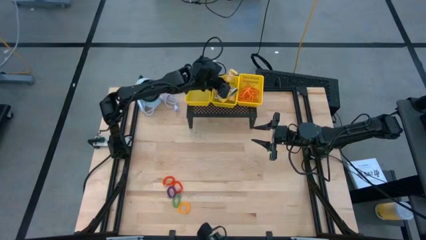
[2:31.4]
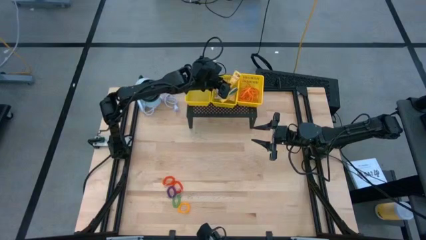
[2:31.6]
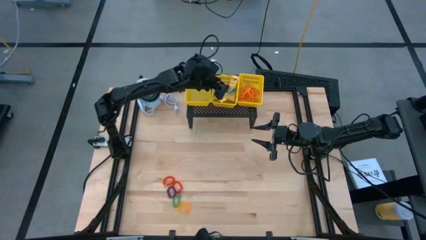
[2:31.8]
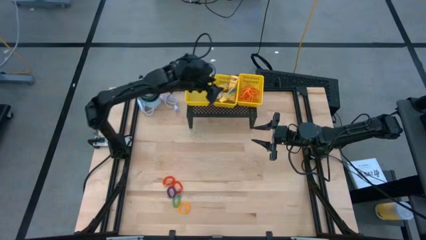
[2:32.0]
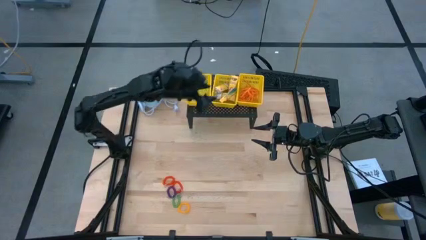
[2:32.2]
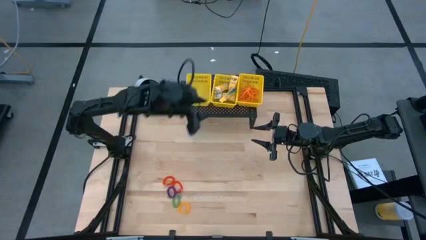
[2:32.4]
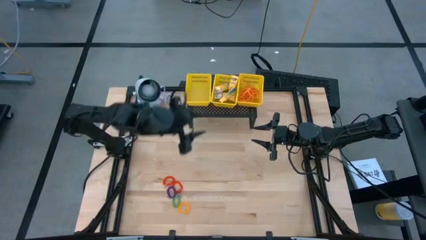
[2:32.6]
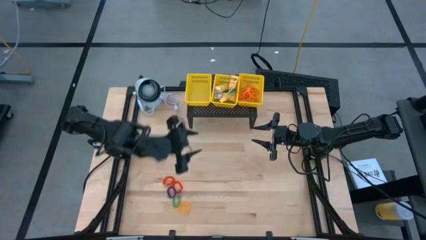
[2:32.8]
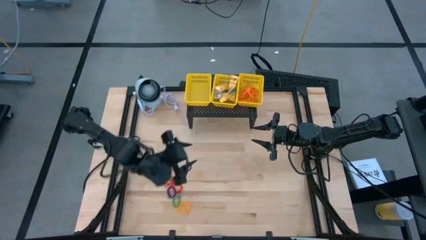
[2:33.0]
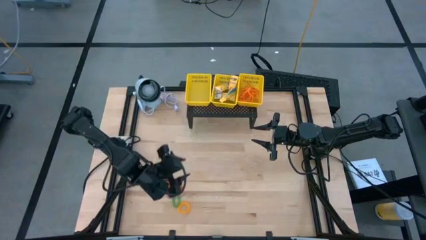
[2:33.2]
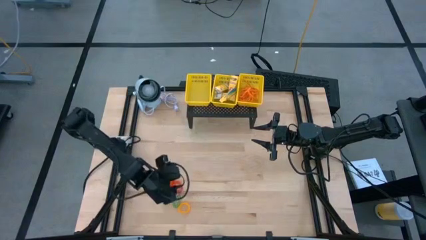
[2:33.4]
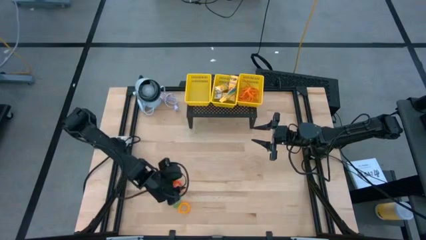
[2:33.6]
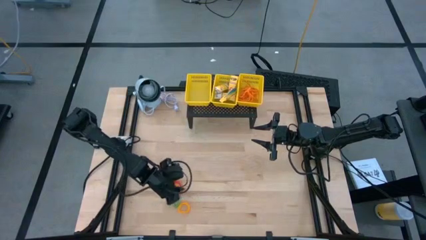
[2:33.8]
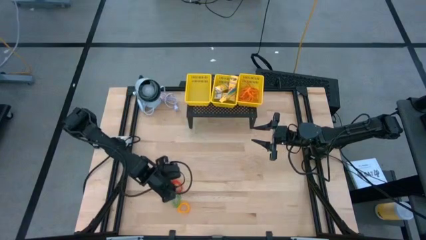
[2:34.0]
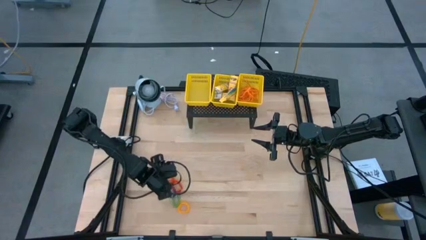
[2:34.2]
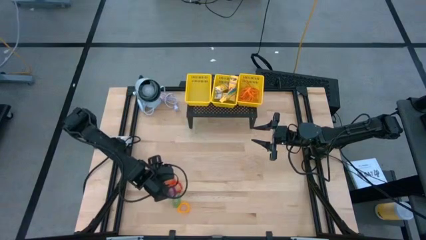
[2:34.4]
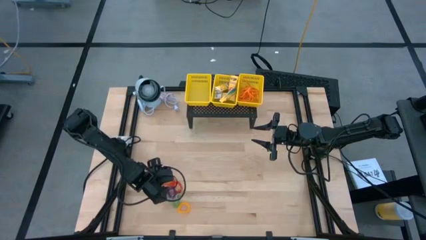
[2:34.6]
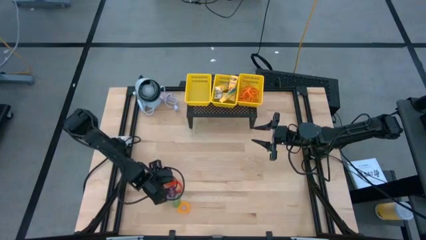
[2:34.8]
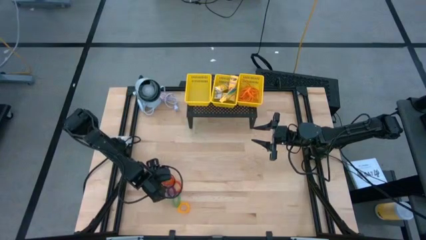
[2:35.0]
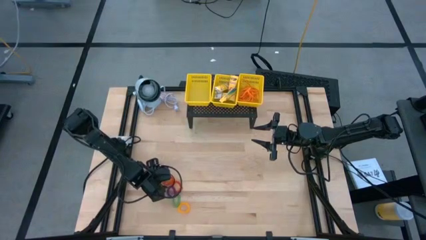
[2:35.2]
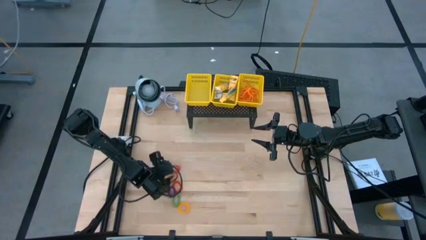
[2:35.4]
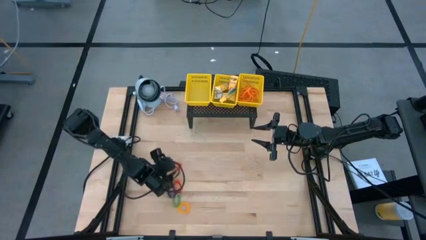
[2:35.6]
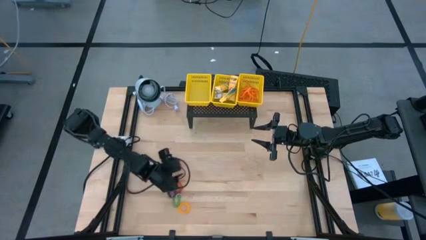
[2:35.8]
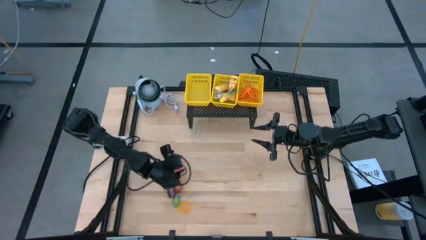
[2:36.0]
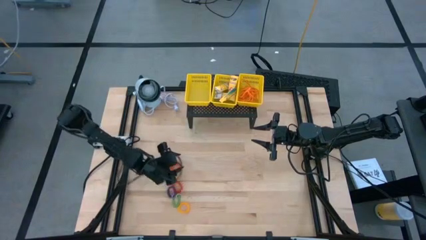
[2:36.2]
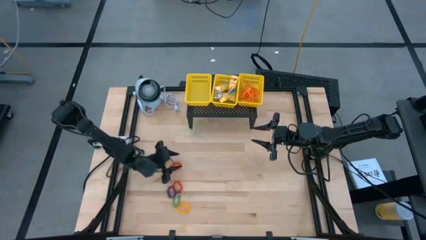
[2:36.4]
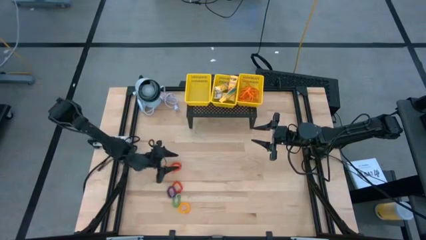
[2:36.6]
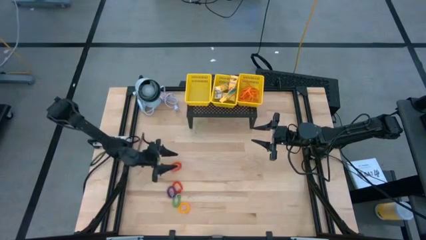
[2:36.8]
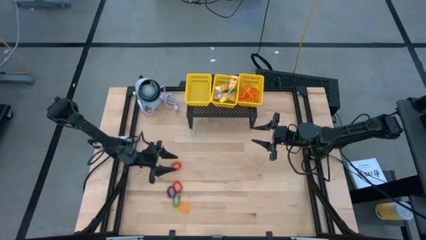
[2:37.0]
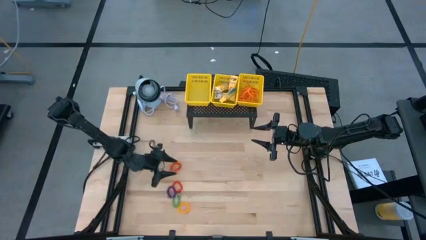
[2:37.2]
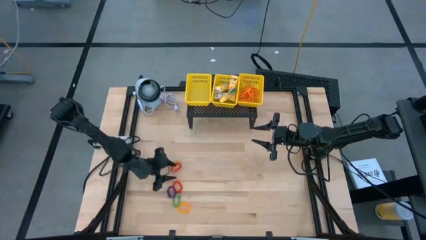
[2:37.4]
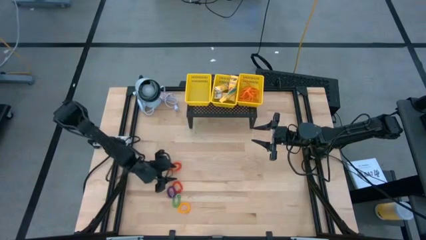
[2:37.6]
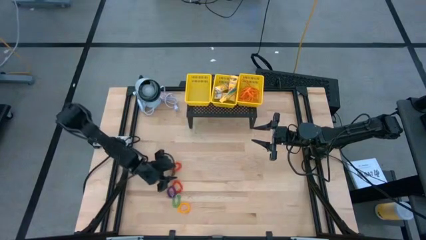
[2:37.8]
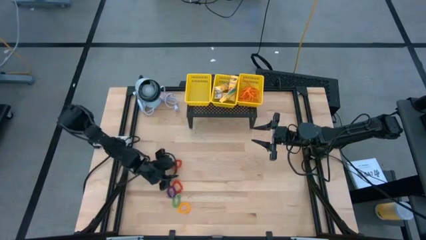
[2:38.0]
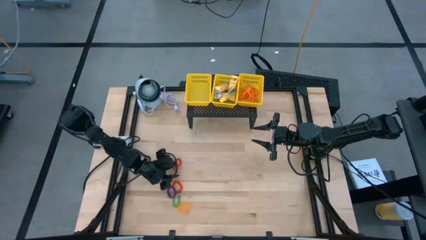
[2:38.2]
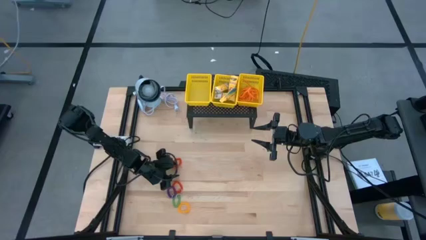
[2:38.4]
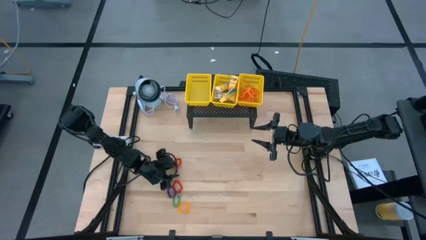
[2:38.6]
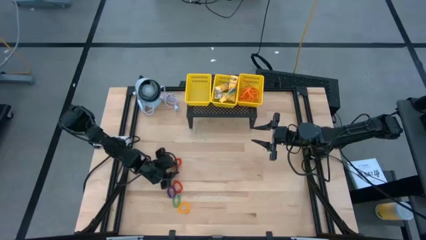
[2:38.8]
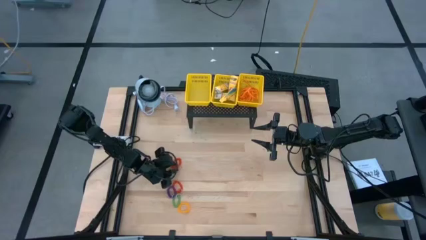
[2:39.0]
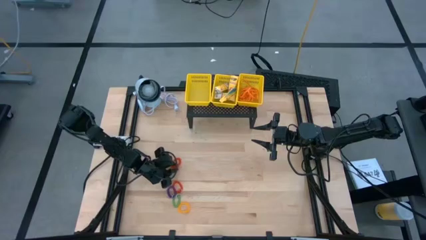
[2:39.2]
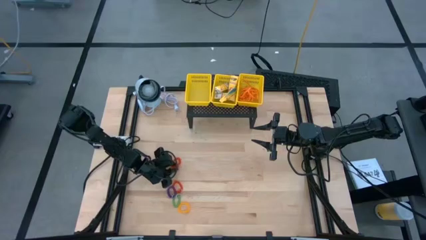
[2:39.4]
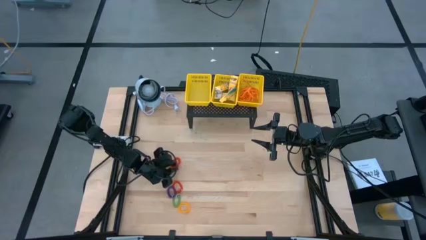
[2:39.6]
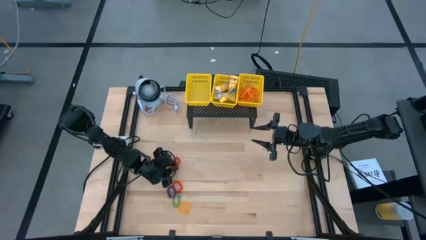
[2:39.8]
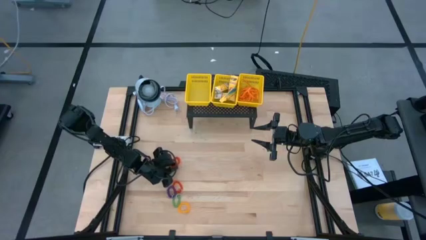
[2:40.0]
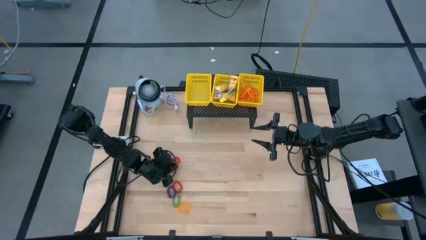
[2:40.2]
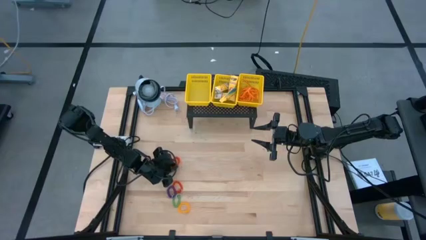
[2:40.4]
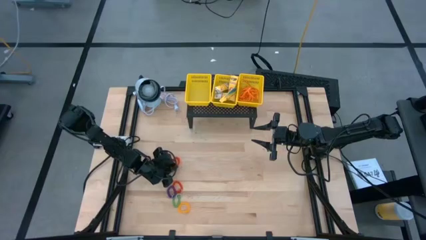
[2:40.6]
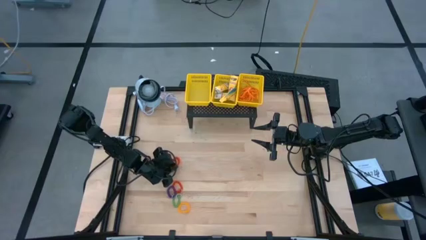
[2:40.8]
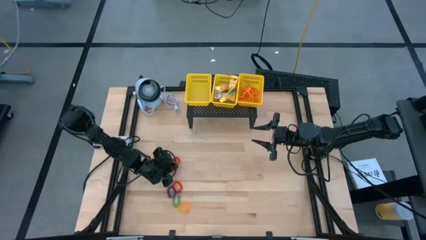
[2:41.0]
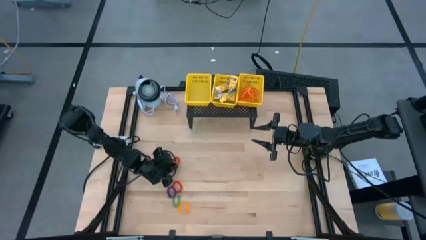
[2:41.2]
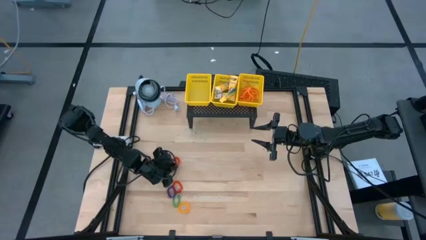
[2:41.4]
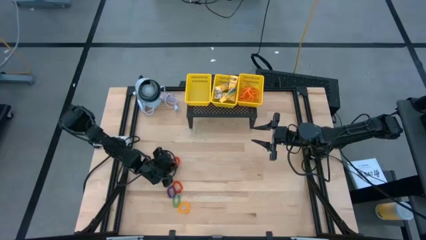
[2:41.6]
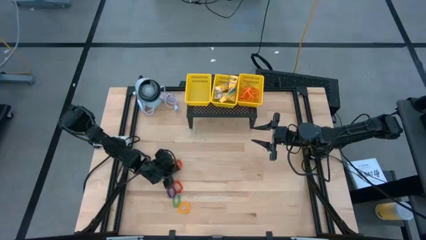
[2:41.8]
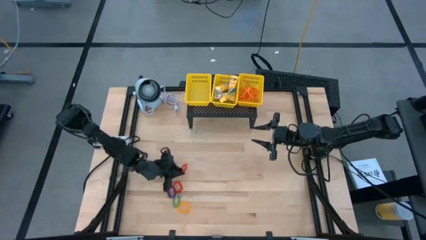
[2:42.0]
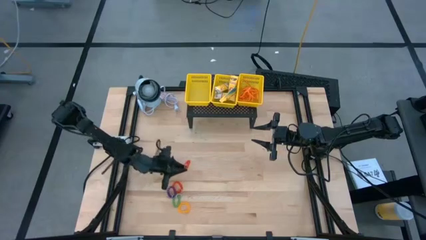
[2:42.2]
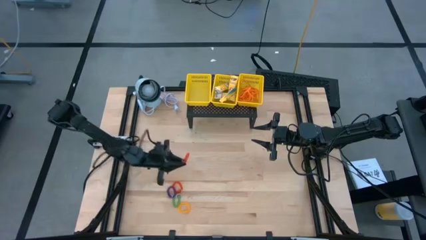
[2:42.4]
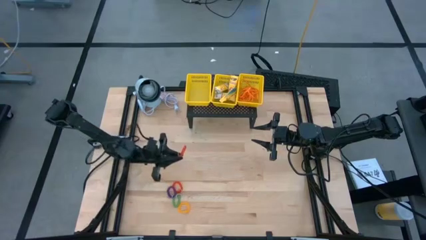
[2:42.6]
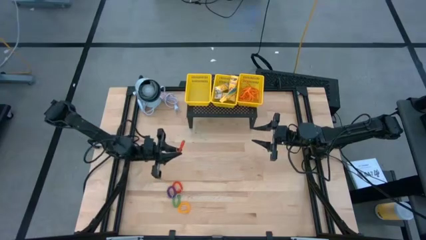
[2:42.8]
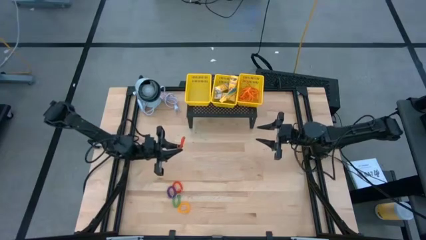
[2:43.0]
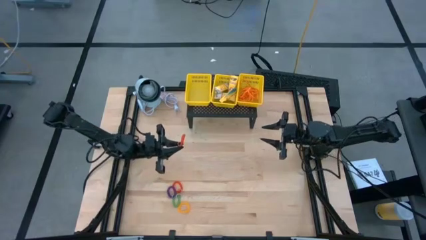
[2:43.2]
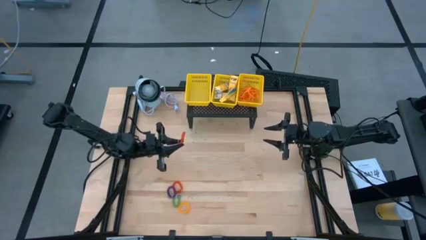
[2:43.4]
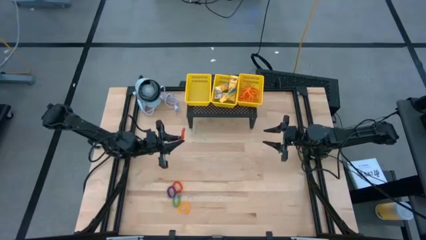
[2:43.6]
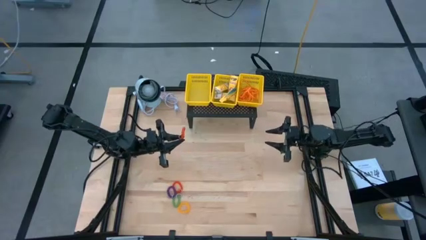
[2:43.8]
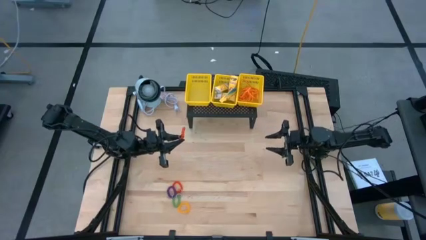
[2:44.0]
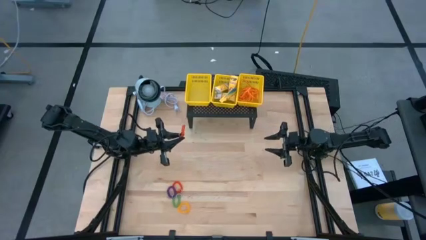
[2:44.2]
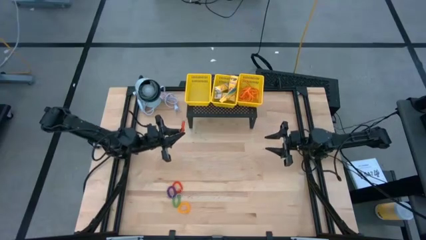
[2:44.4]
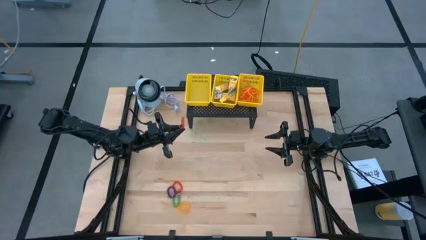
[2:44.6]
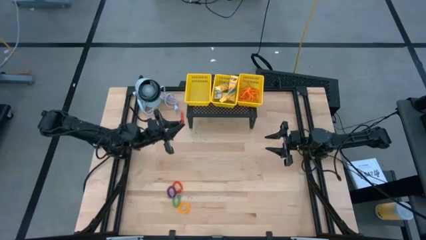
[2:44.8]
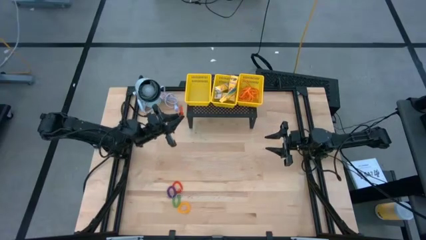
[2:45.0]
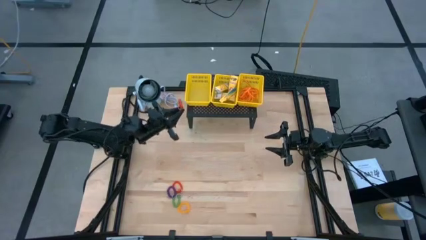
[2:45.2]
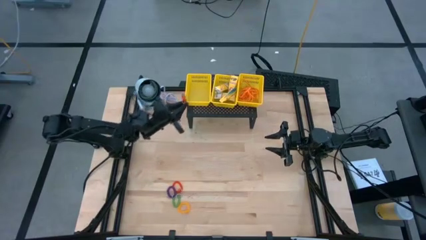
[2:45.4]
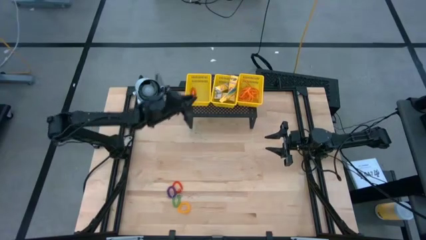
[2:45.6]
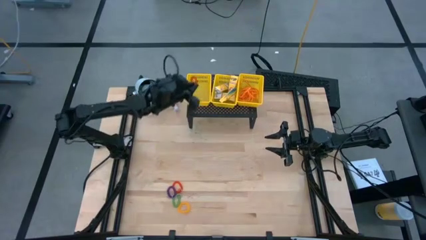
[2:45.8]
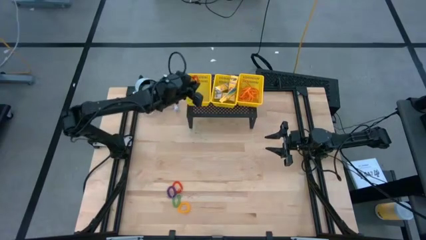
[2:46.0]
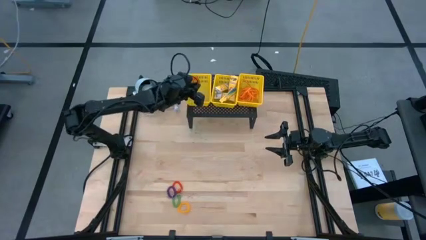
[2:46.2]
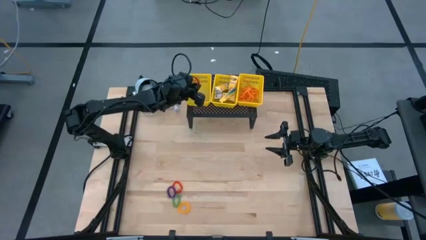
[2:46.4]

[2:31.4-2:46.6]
Task: Pick & Place Office Desk Supplies
Put the orange spring keychain into the left yellow bin on the shelf
